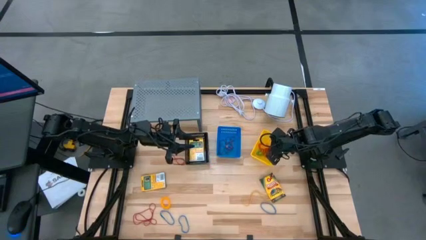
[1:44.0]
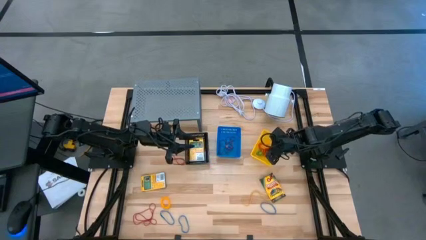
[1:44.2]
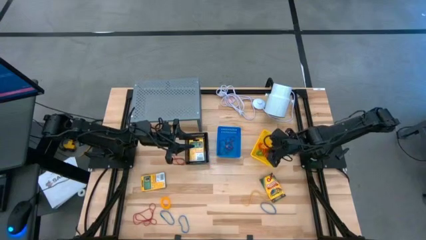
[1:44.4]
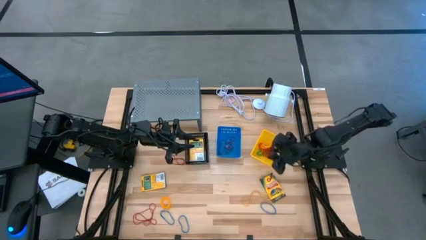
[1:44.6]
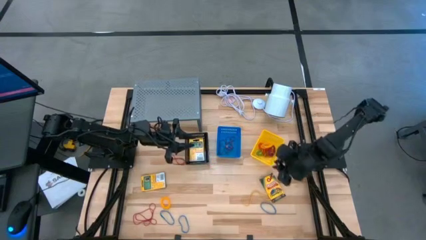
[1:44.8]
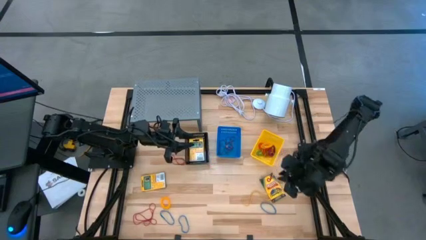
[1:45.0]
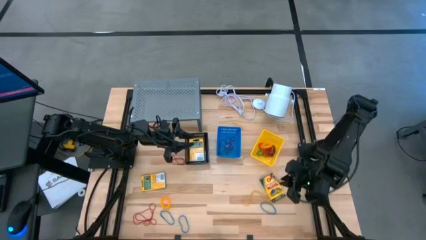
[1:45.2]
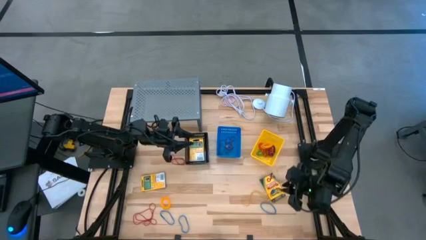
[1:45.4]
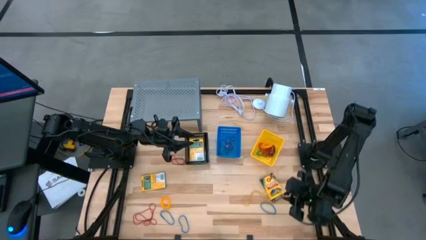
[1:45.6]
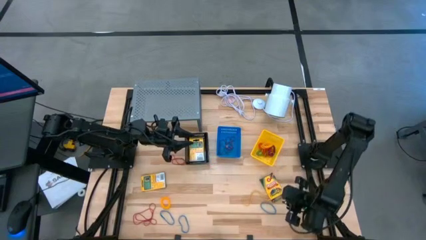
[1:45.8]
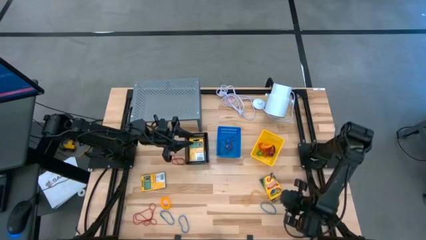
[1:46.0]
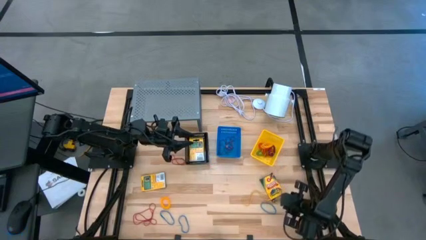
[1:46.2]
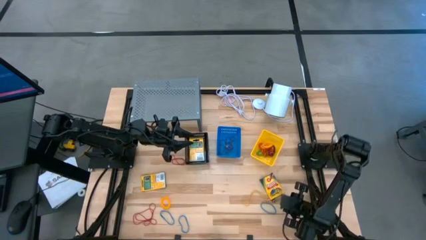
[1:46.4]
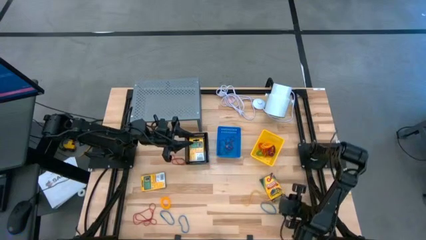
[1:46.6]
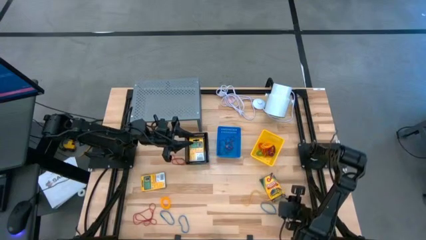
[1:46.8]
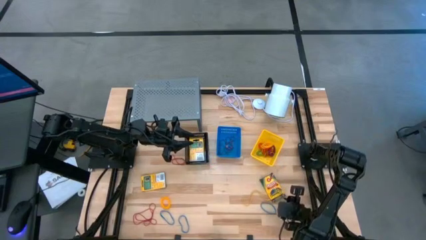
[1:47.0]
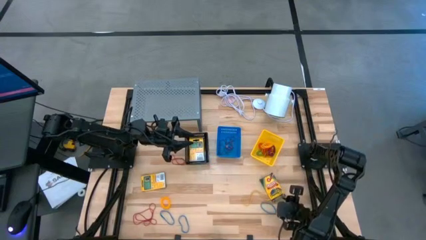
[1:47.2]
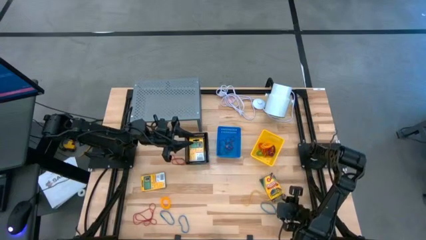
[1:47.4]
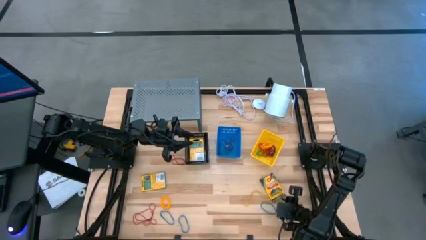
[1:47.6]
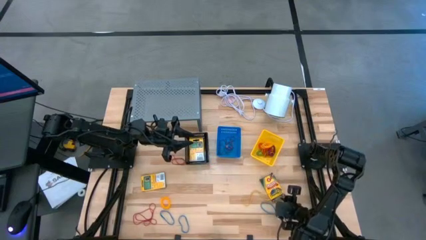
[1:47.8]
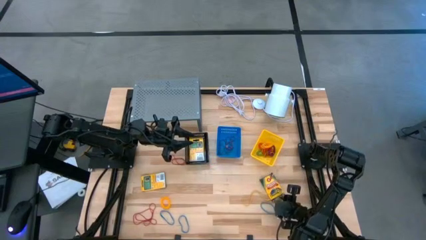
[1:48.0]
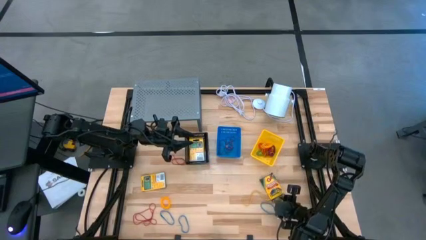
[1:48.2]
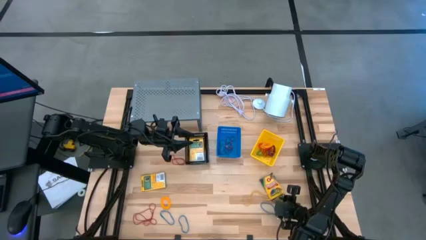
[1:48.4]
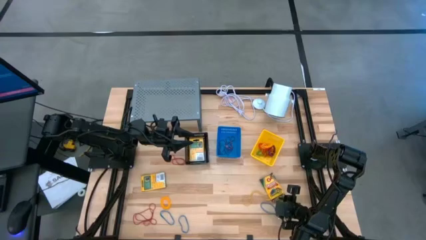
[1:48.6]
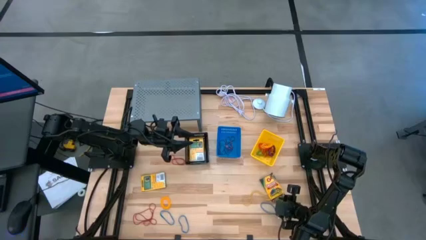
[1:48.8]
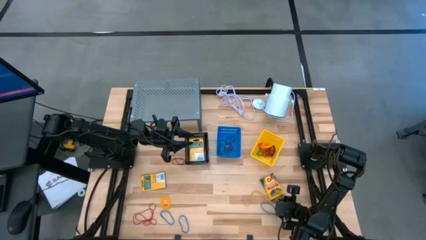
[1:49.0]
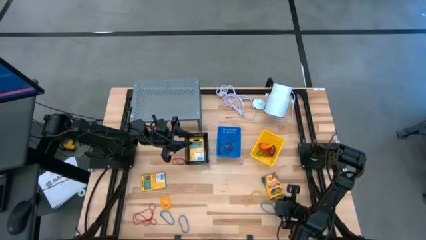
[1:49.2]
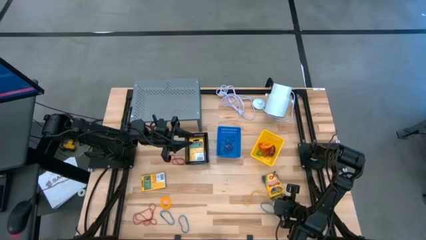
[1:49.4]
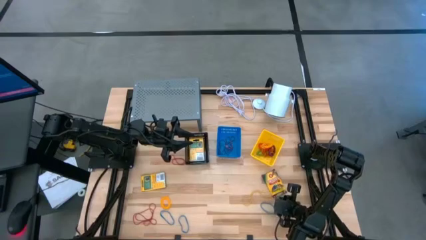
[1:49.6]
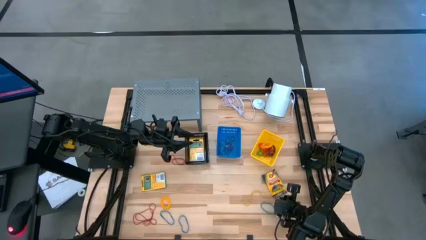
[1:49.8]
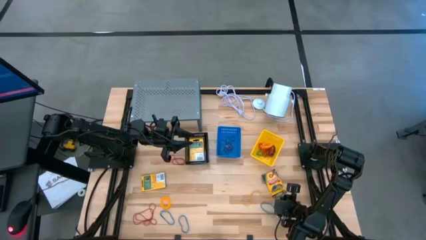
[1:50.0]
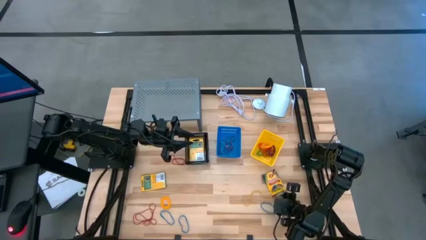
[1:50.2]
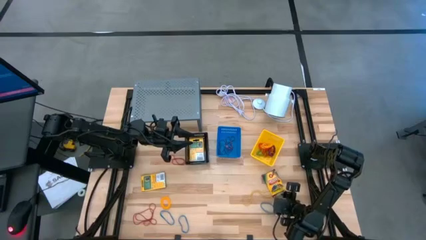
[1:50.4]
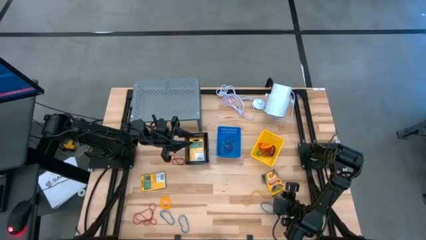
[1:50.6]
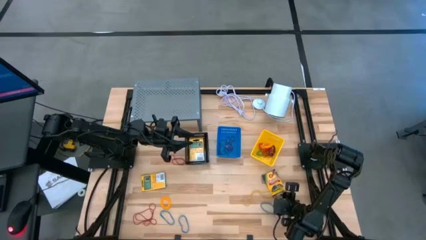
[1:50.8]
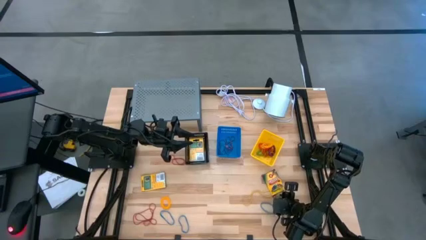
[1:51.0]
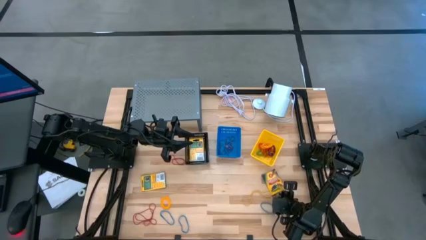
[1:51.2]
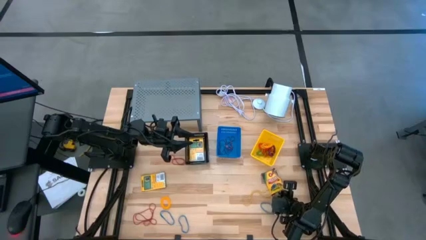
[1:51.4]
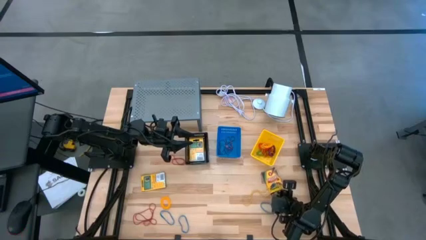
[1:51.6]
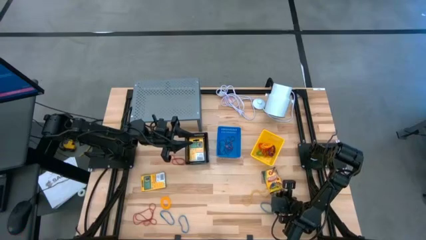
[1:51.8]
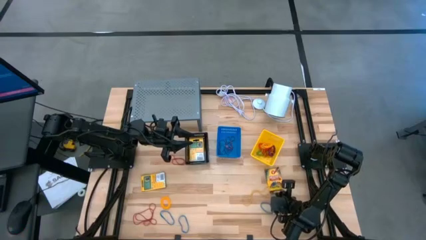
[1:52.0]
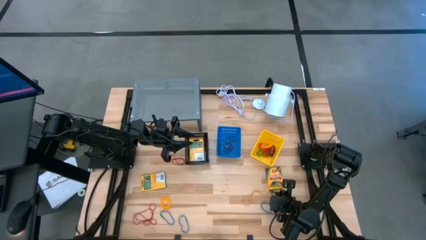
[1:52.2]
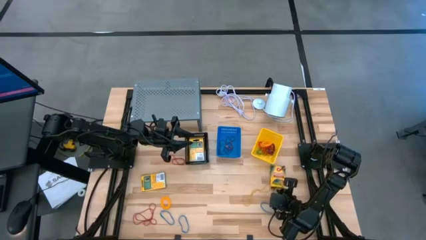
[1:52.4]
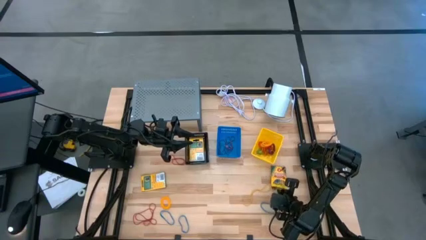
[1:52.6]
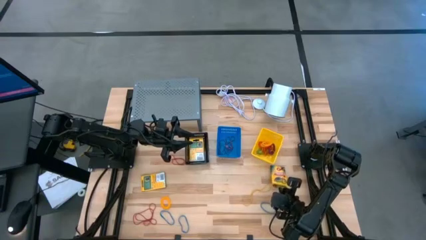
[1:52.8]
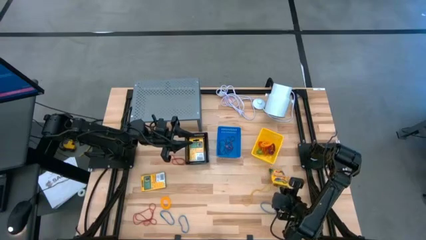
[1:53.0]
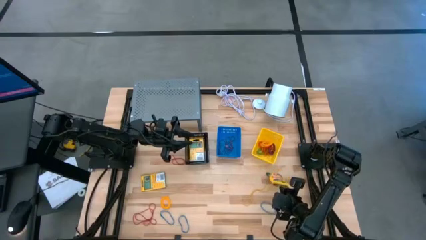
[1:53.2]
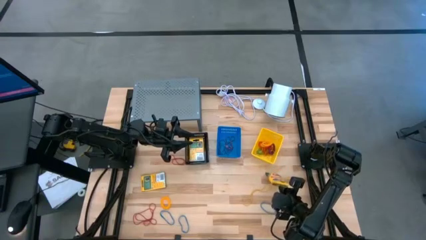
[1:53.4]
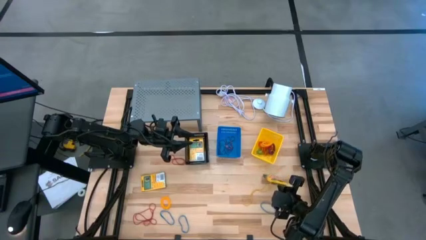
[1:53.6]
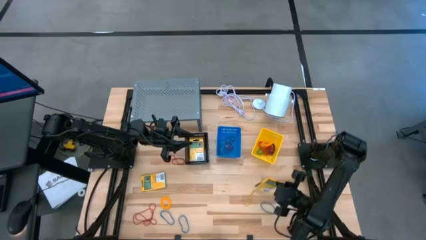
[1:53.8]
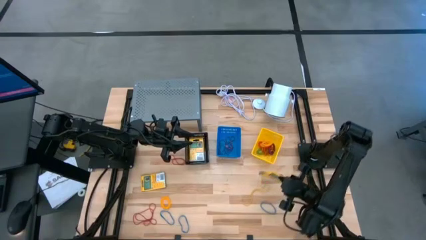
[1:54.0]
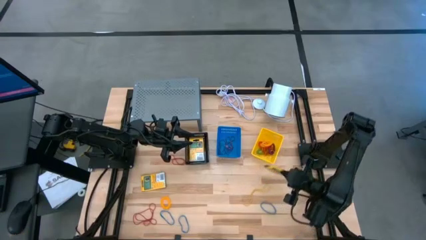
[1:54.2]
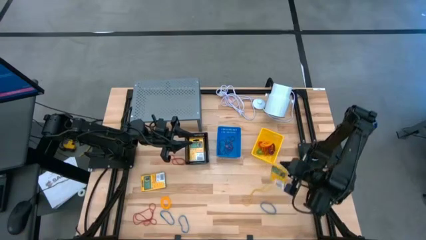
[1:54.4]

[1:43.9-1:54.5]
Task: Pick & Place Office Desk Supplies
Put the crayon box into the black basket
